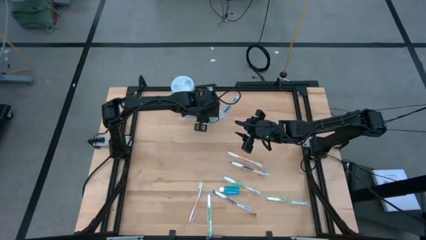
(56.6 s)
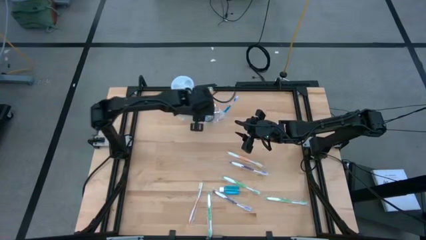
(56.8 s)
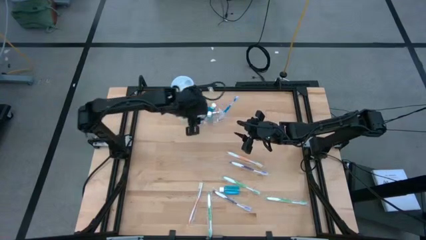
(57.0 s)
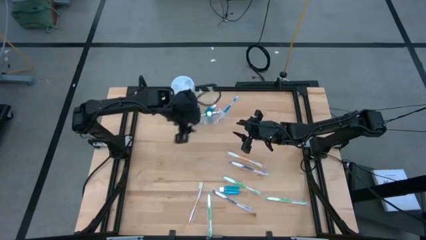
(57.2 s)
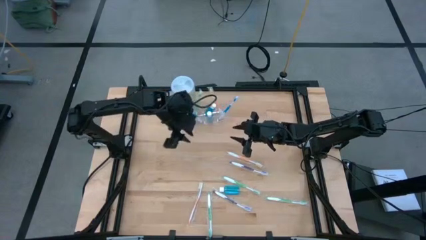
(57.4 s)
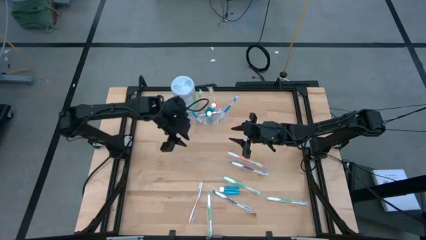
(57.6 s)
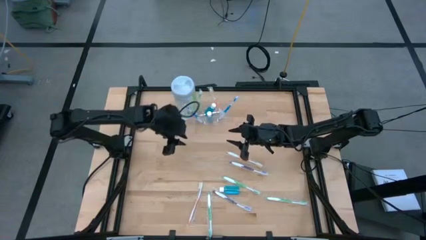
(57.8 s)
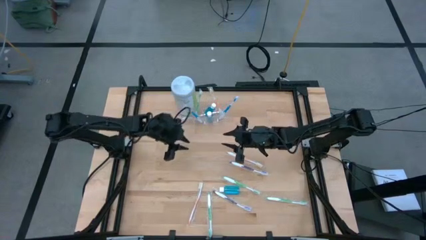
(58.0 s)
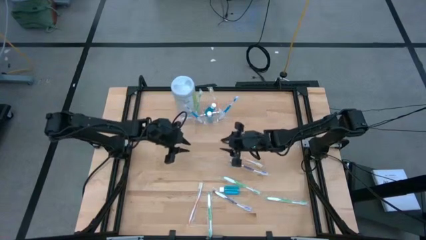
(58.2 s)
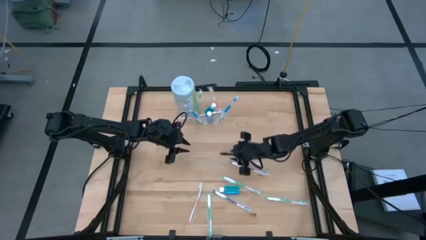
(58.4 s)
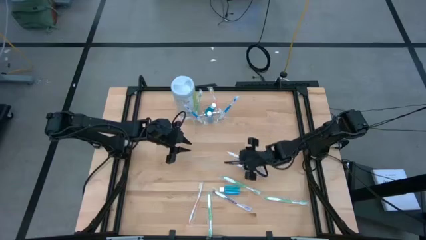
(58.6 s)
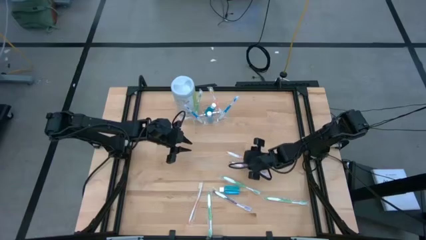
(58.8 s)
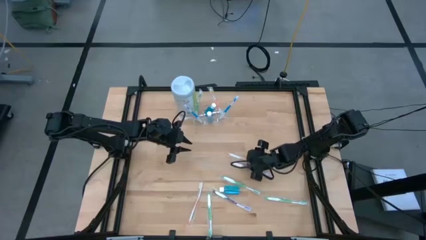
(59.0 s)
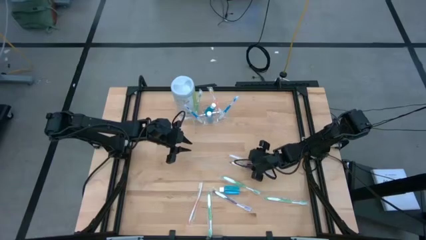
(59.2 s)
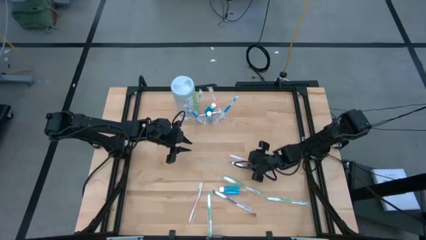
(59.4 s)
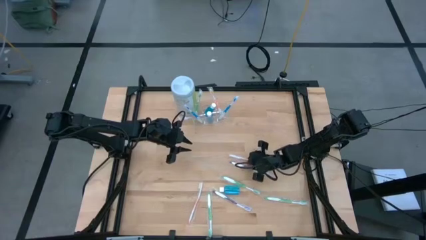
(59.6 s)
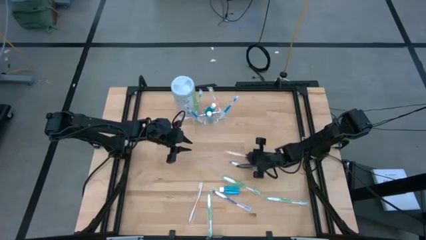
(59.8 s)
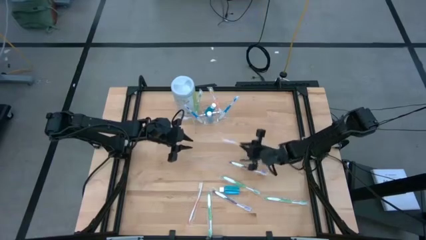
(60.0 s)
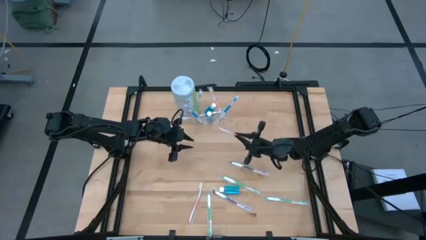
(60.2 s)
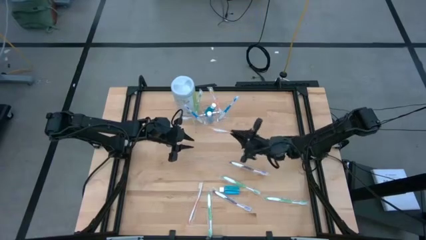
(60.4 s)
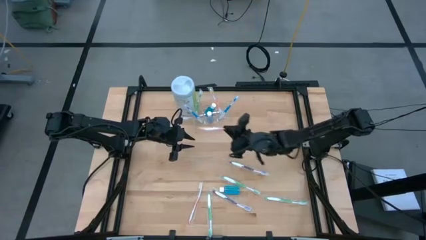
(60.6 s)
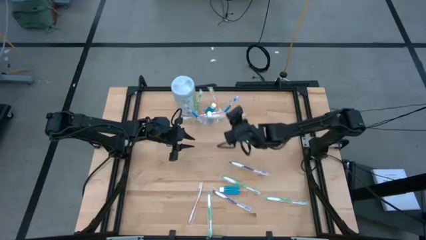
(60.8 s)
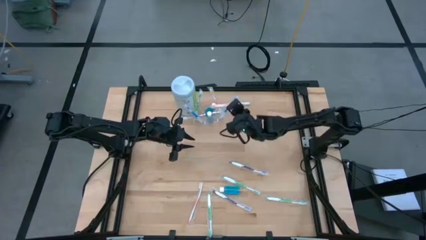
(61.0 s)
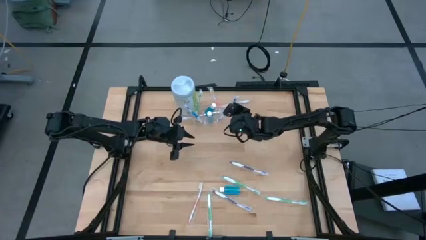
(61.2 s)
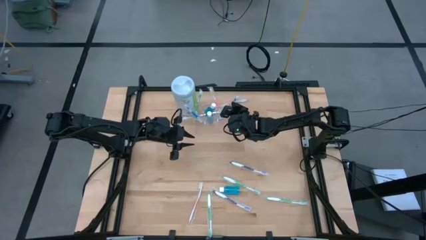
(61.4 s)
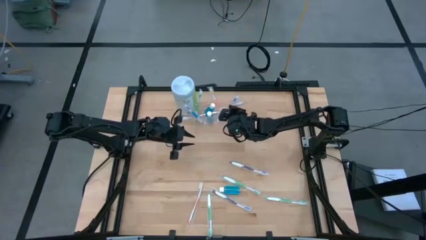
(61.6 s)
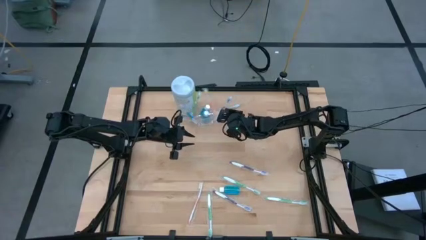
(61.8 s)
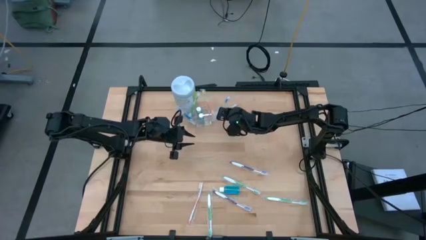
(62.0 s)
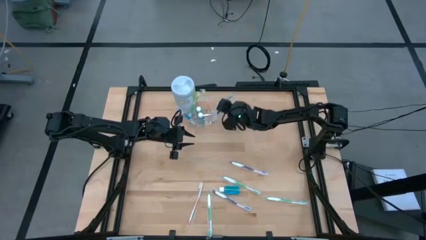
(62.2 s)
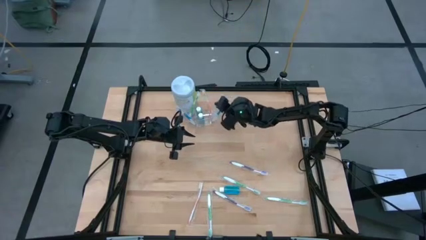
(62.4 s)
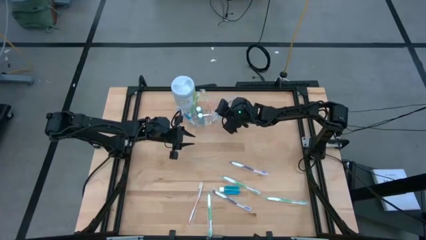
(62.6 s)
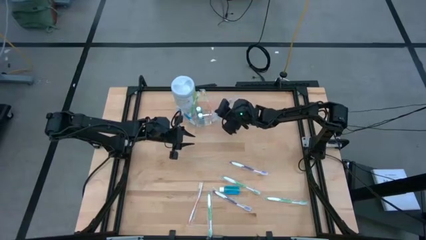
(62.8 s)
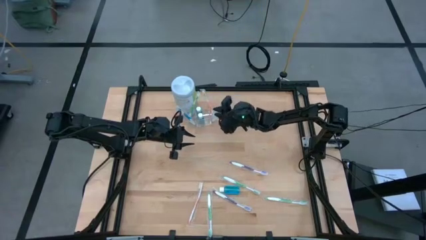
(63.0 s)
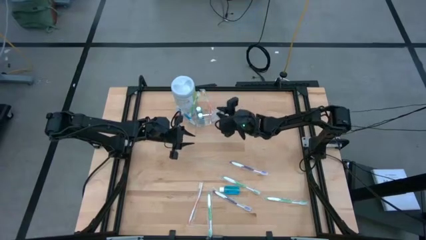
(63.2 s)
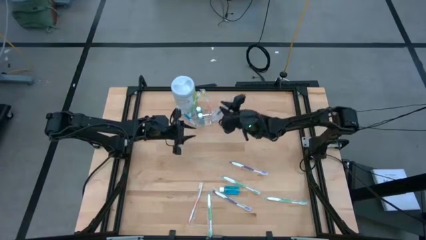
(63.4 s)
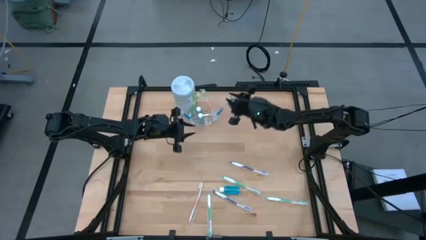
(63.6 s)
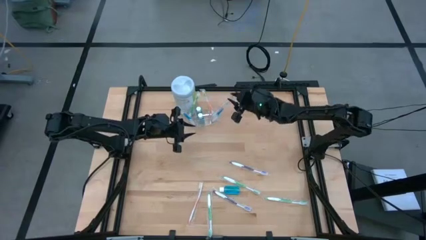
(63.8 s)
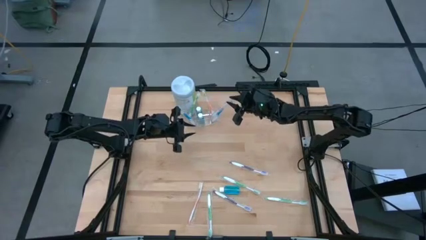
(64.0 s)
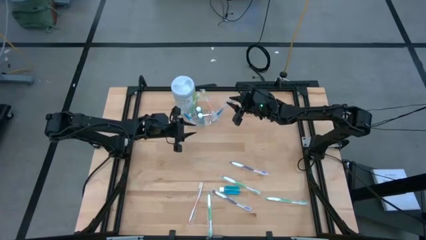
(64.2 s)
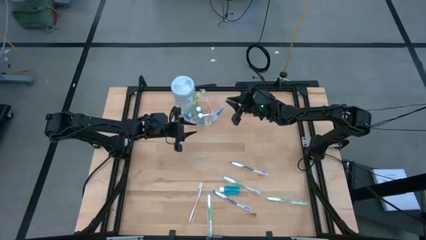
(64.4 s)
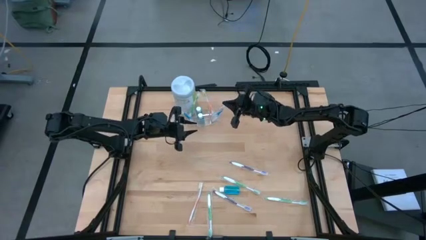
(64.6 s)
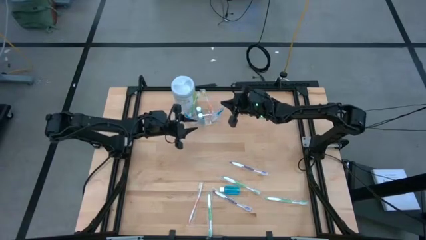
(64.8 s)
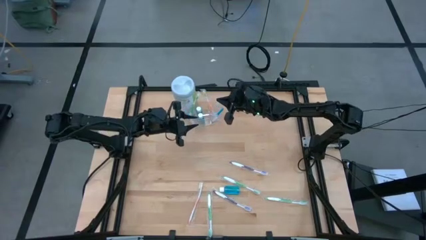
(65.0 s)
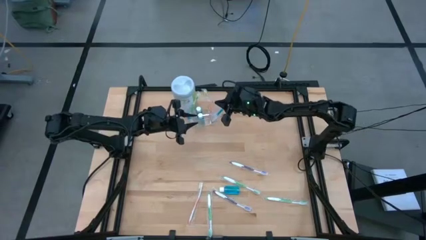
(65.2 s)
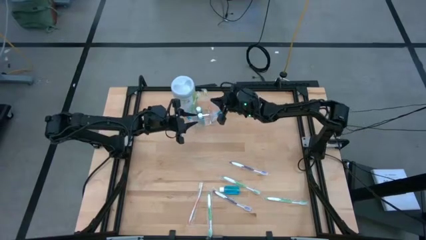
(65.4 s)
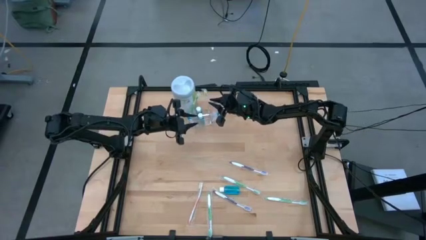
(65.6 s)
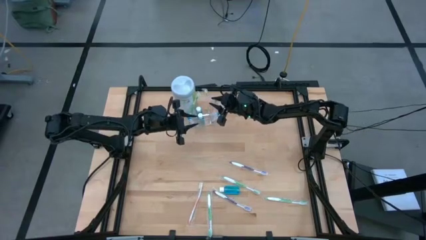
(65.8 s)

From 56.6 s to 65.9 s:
Task: Pick & Place toothbrushing station
Put the orange toothbrush into the transparent organizer

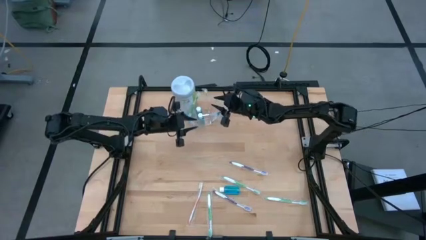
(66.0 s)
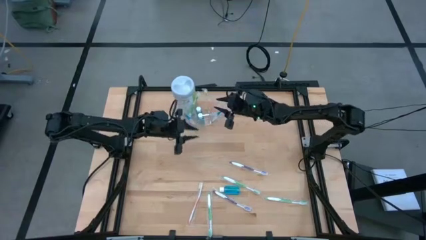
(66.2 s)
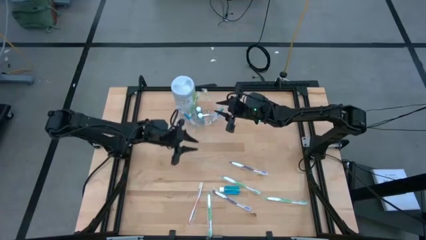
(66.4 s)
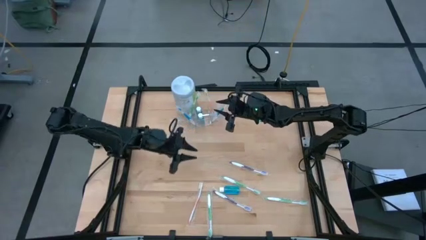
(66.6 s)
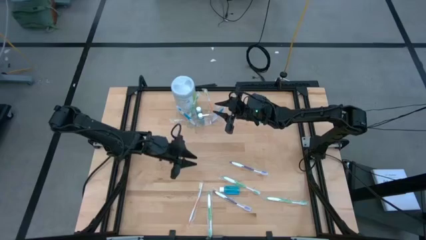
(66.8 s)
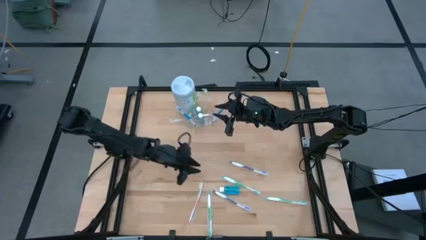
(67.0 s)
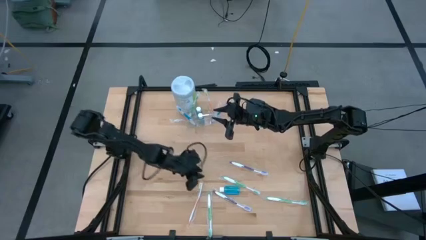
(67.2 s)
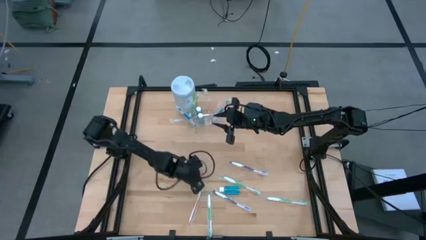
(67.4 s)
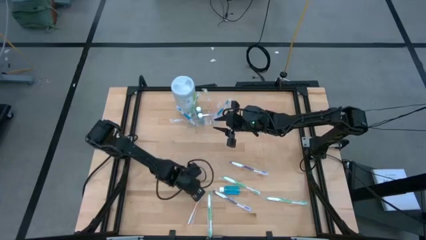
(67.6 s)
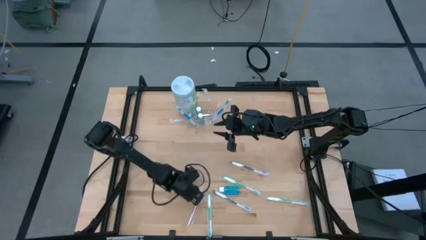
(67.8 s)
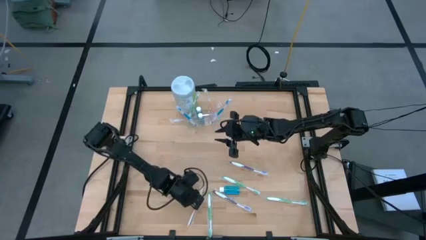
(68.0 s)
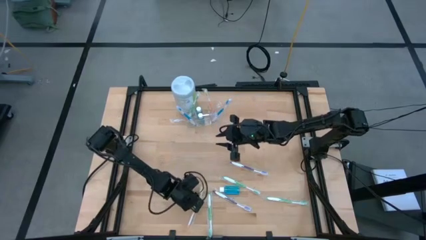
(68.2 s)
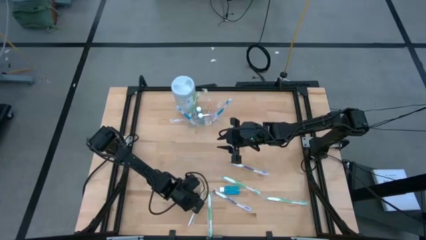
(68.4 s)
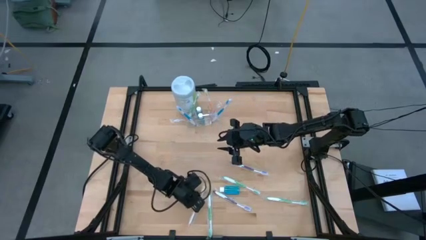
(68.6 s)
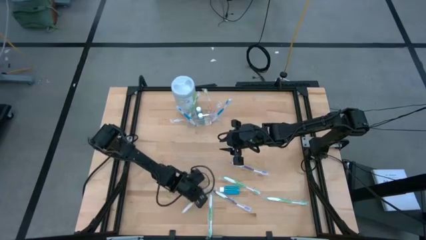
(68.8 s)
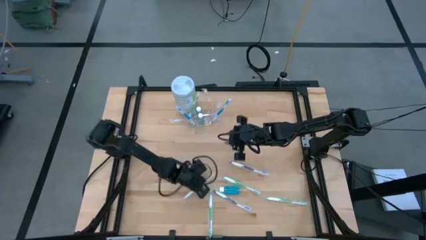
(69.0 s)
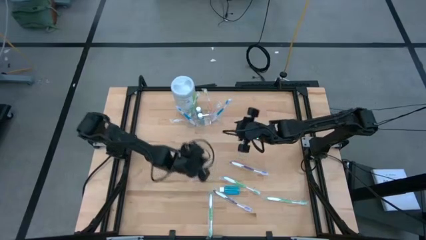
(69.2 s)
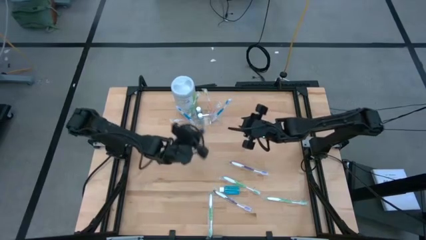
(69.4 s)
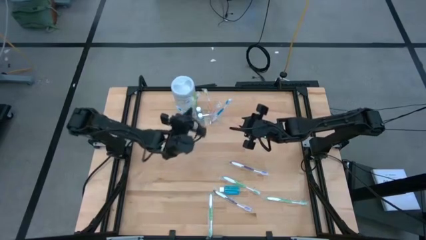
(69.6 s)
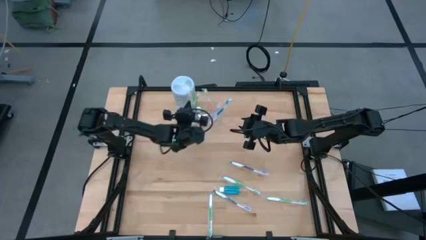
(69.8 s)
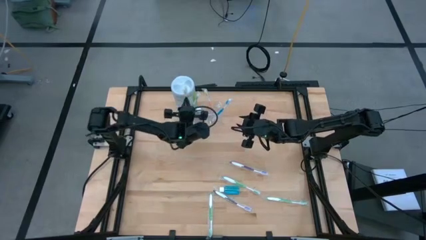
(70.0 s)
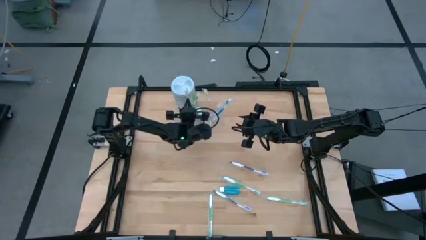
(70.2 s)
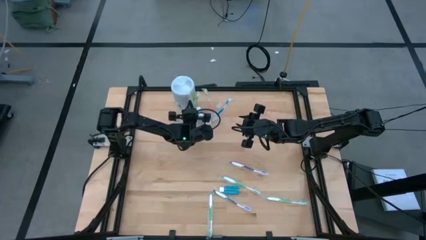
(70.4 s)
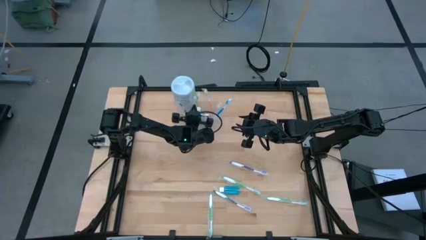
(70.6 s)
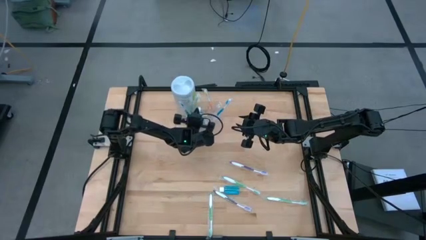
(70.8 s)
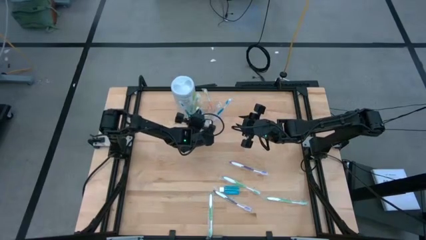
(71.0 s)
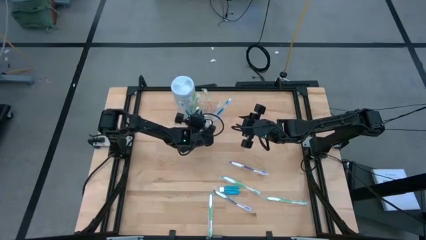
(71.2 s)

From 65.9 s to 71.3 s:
Put the orange toothbrush into the transparent organizer
